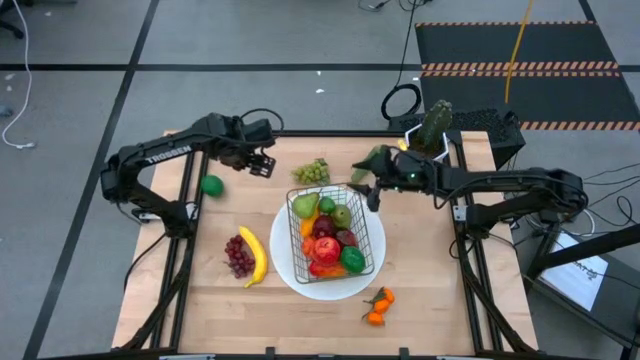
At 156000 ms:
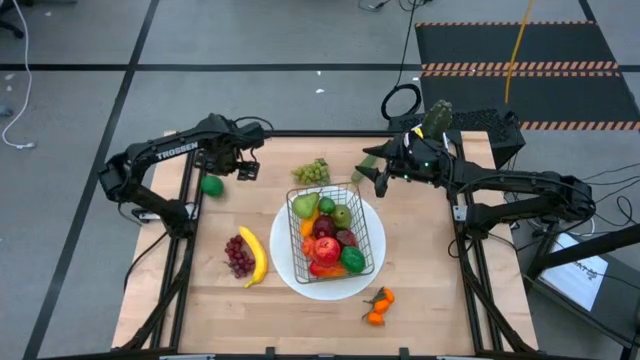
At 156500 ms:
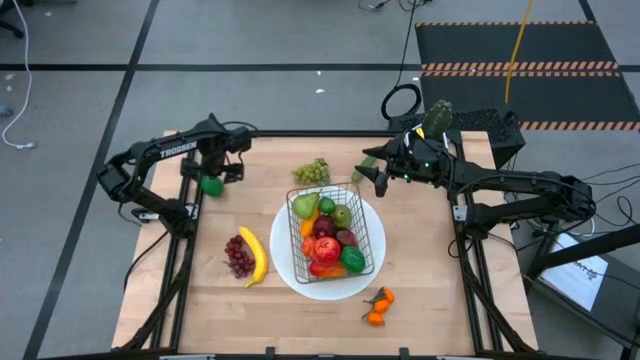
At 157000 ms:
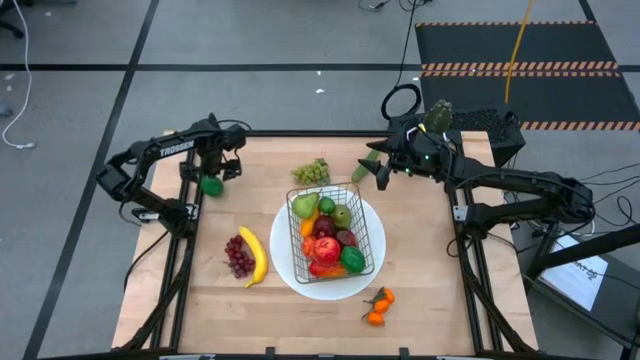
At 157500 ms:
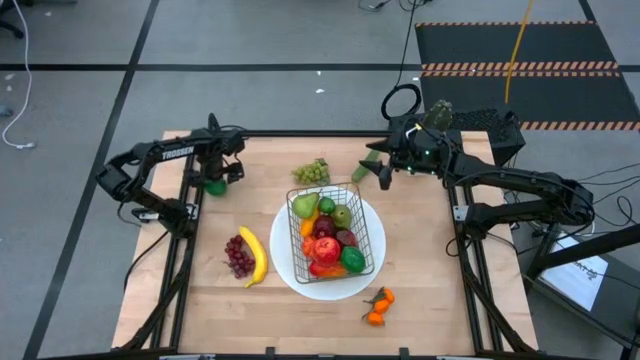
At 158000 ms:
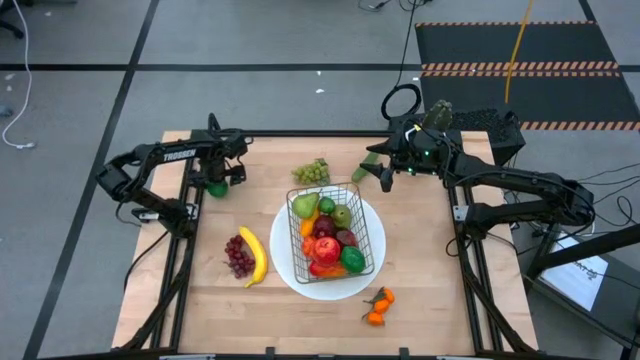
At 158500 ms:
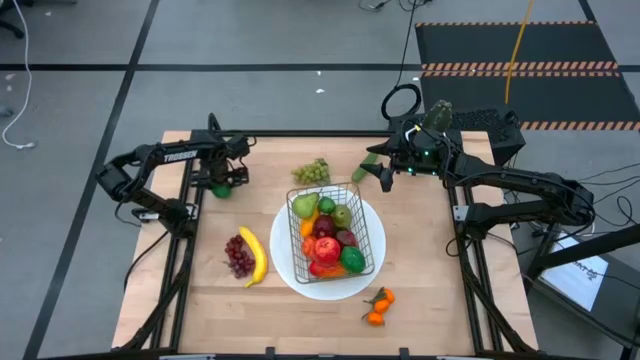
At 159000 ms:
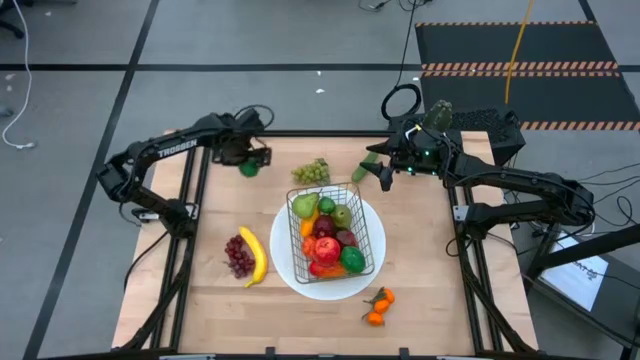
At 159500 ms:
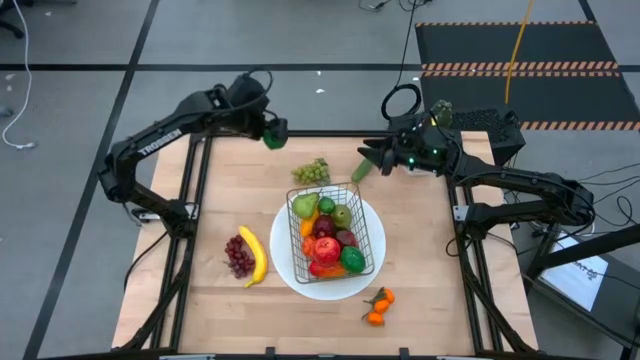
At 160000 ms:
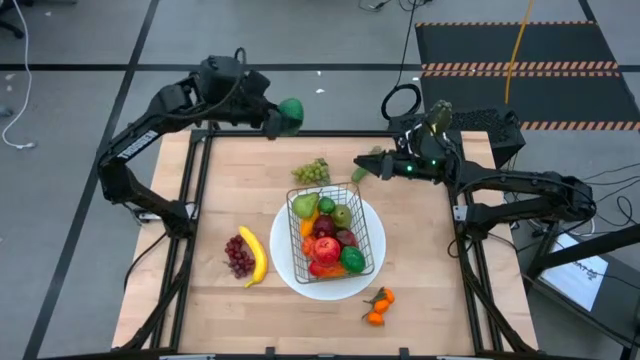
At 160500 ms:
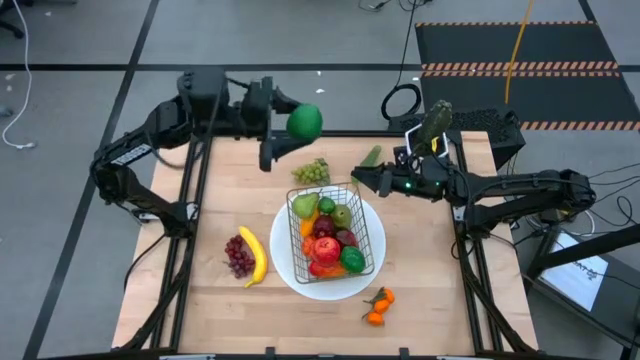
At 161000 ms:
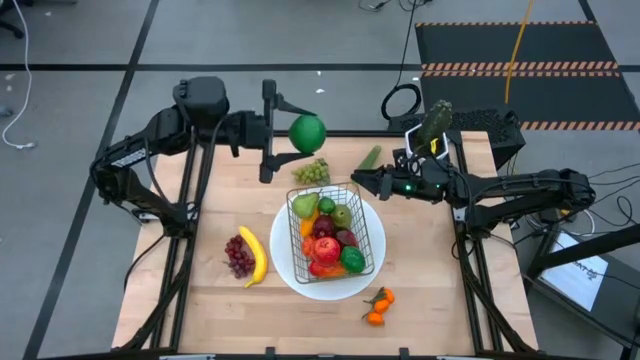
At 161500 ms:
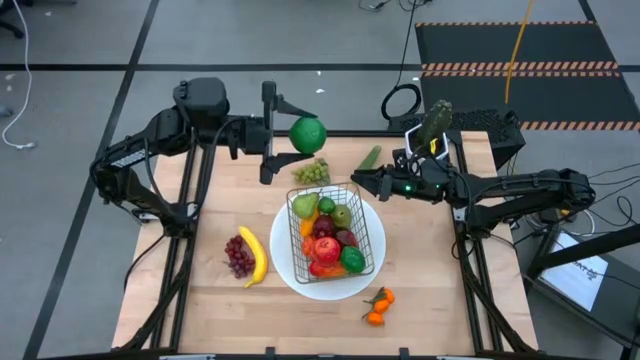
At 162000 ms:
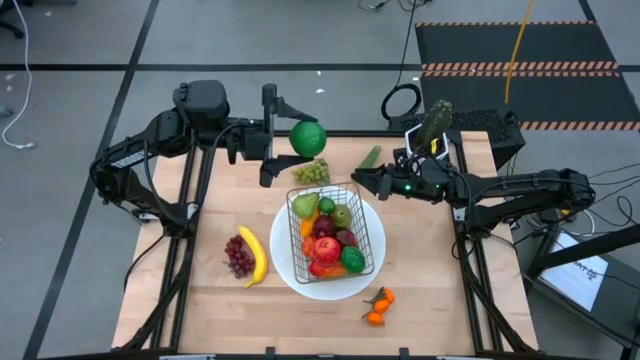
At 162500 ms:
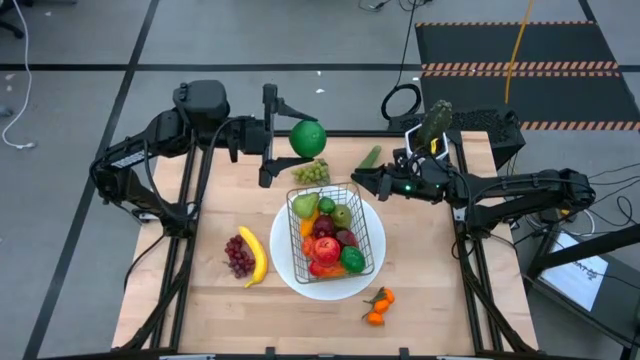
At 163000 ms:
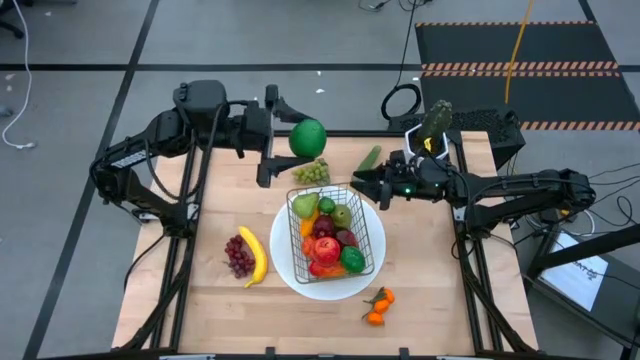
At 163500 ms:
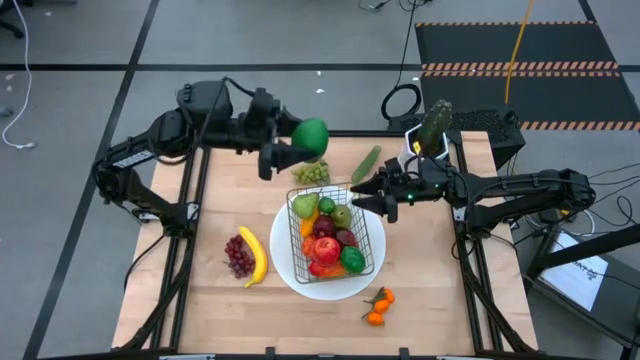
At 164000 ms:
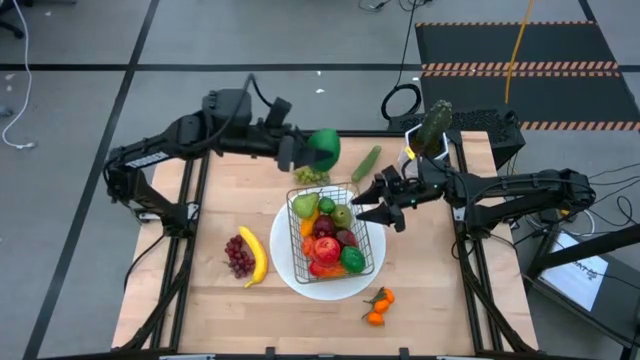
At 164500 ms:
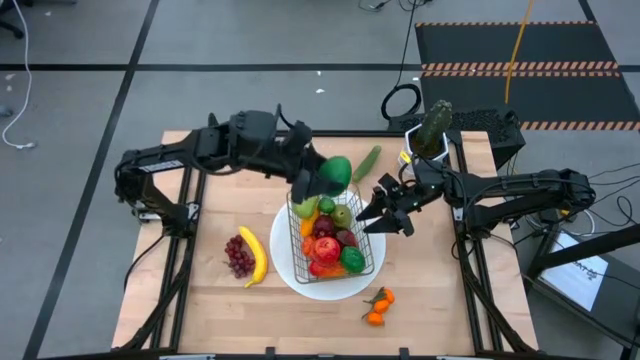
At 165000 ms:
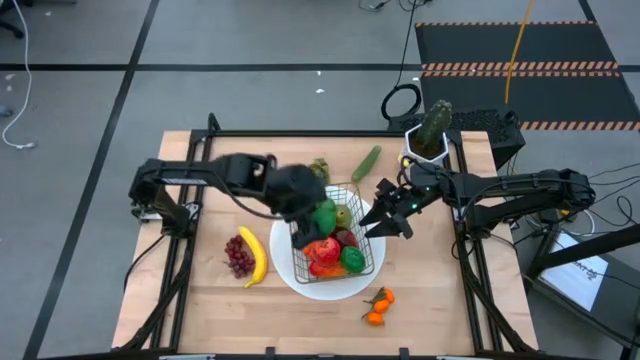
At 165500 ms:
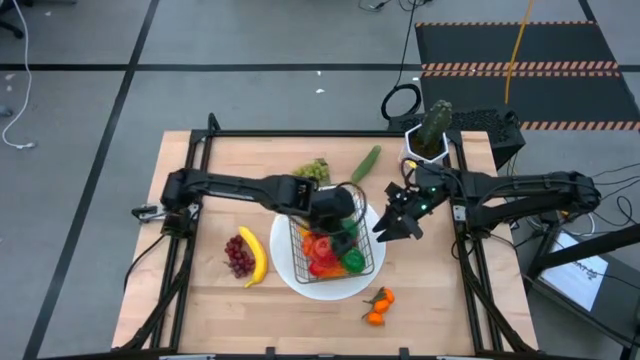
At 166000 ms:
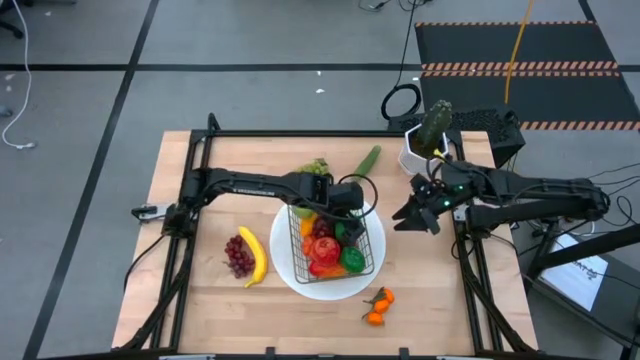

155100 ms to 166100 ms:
Task: Build produce basket
Put the green lime into the black wire basket

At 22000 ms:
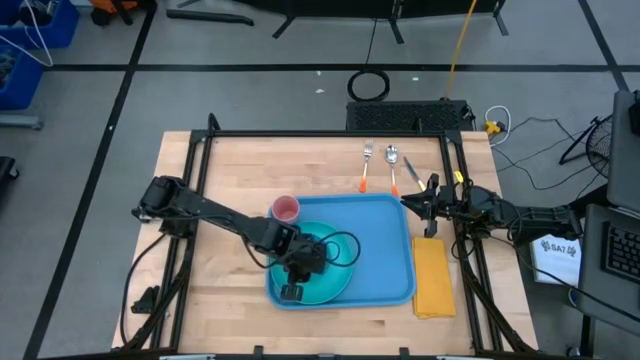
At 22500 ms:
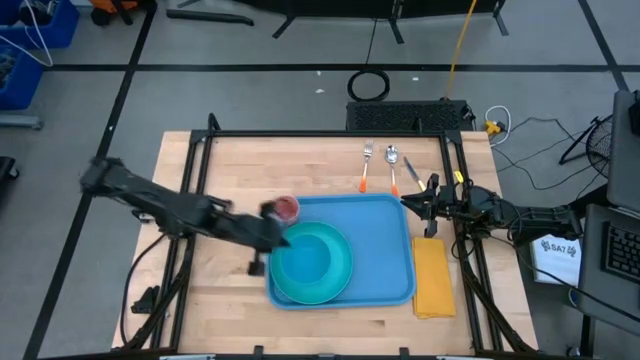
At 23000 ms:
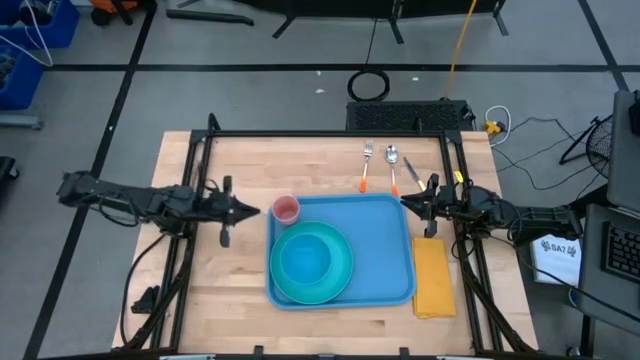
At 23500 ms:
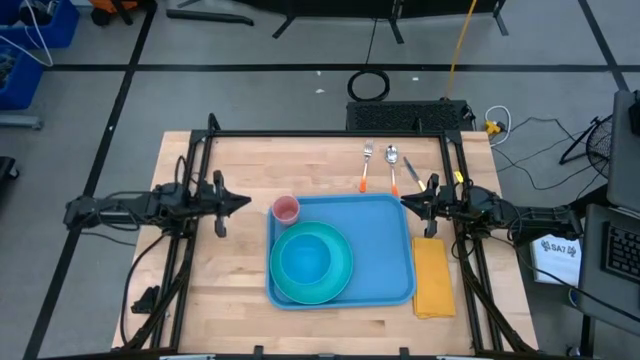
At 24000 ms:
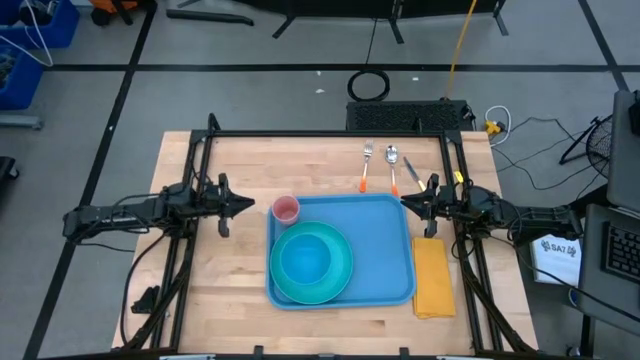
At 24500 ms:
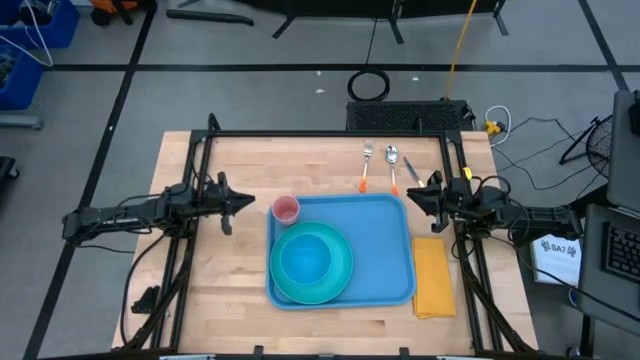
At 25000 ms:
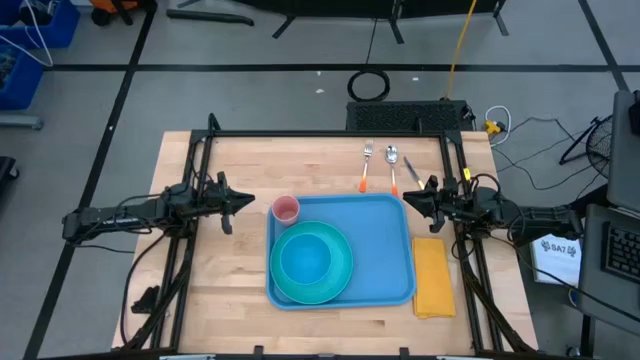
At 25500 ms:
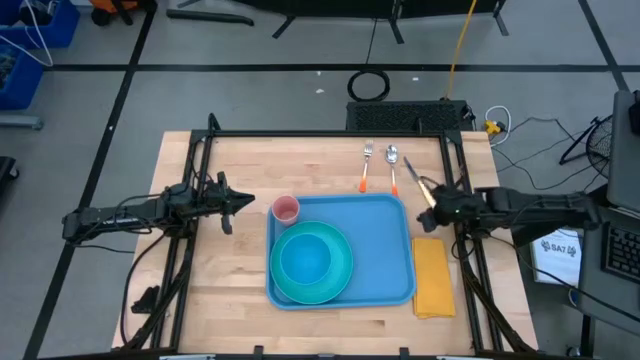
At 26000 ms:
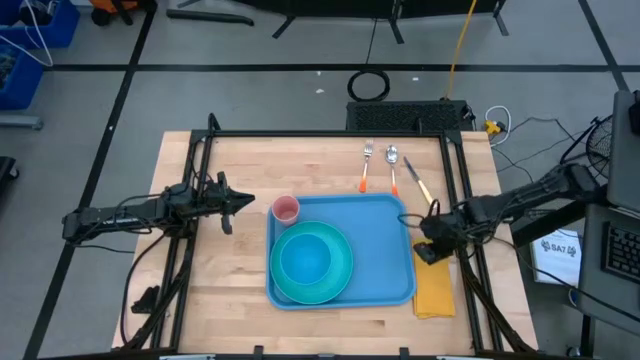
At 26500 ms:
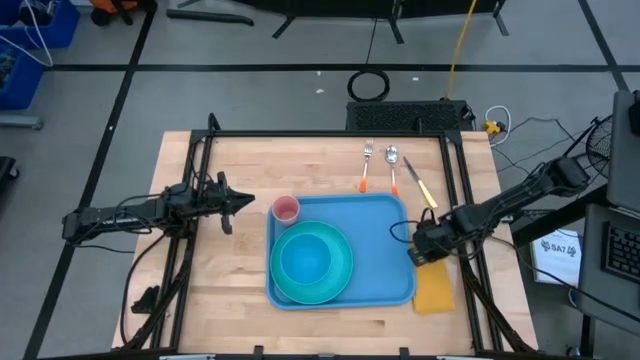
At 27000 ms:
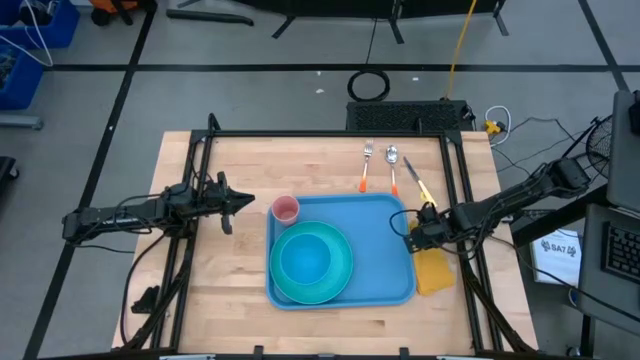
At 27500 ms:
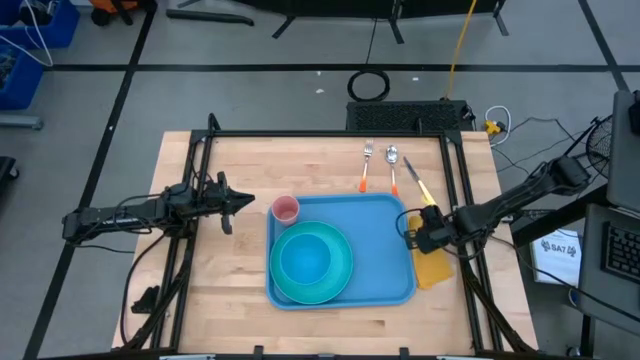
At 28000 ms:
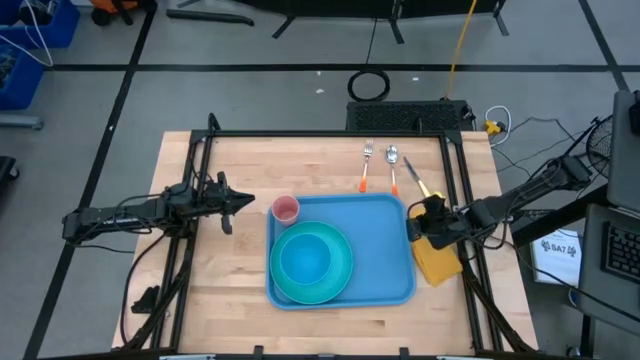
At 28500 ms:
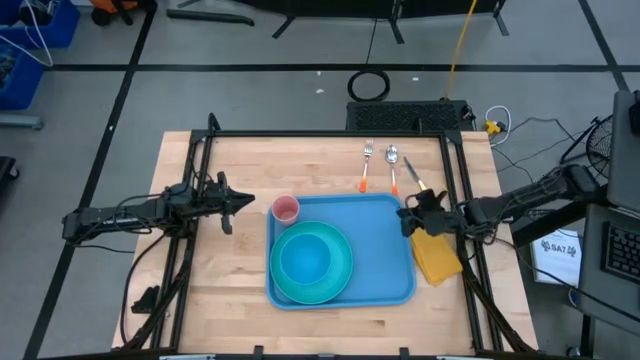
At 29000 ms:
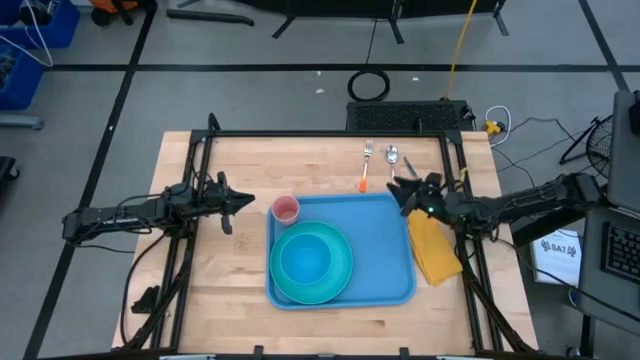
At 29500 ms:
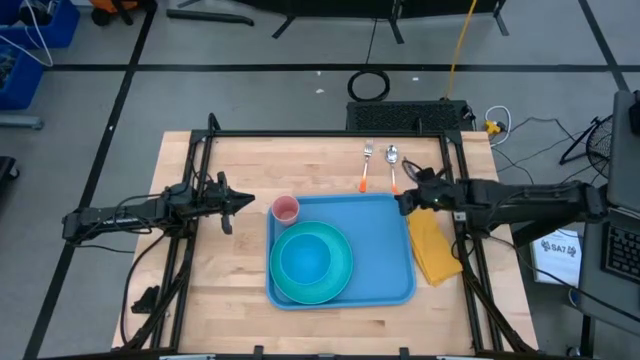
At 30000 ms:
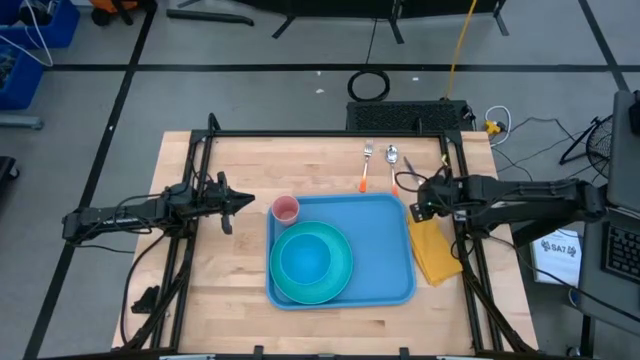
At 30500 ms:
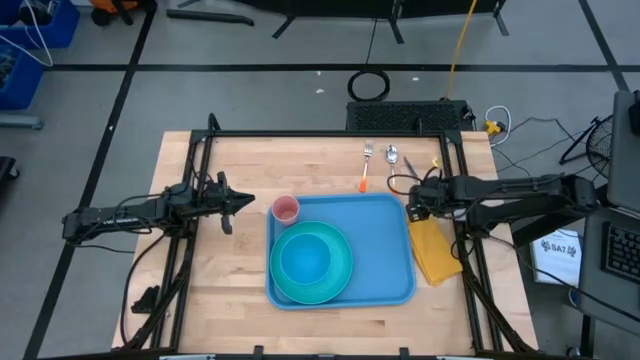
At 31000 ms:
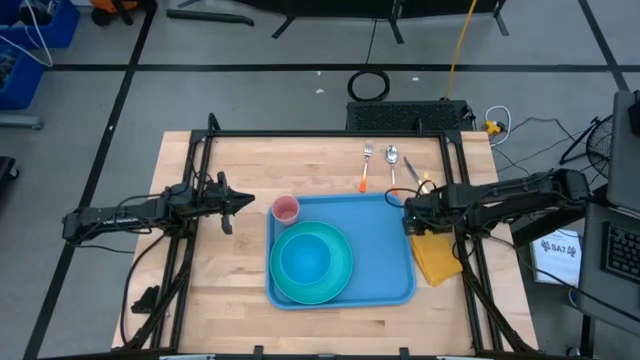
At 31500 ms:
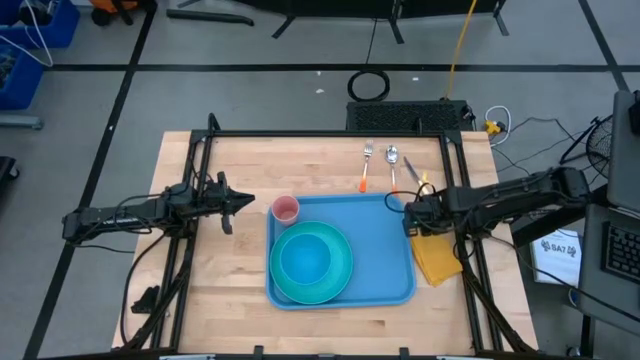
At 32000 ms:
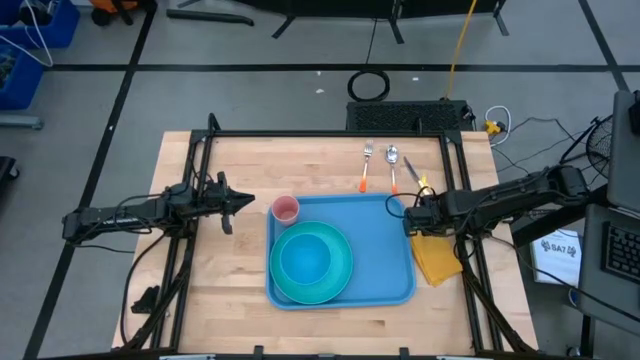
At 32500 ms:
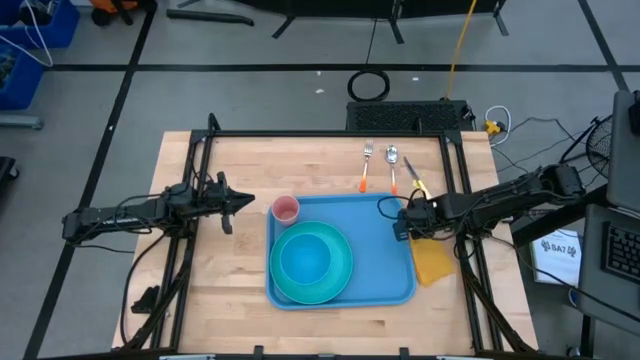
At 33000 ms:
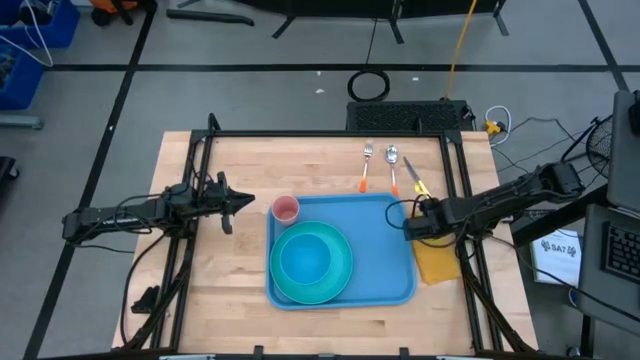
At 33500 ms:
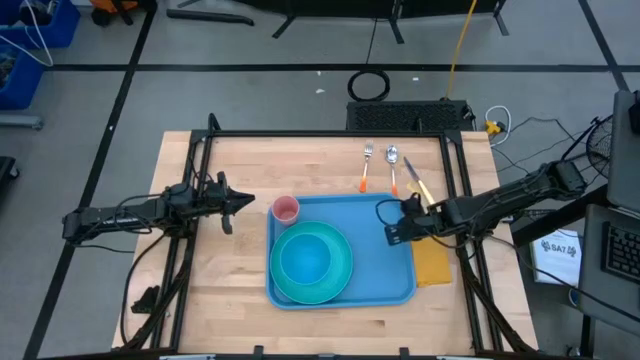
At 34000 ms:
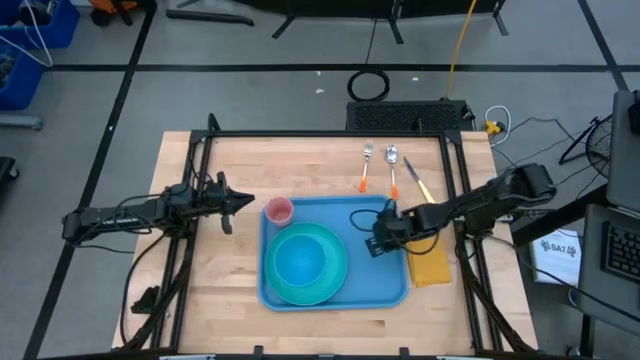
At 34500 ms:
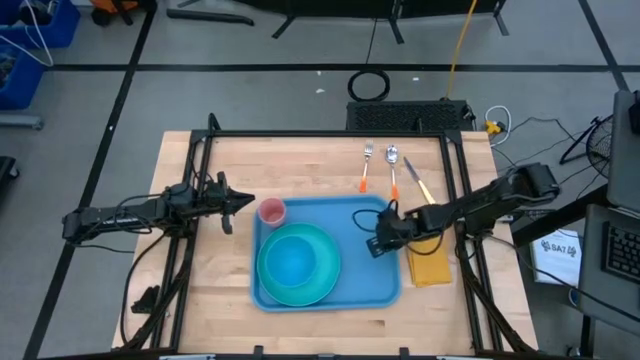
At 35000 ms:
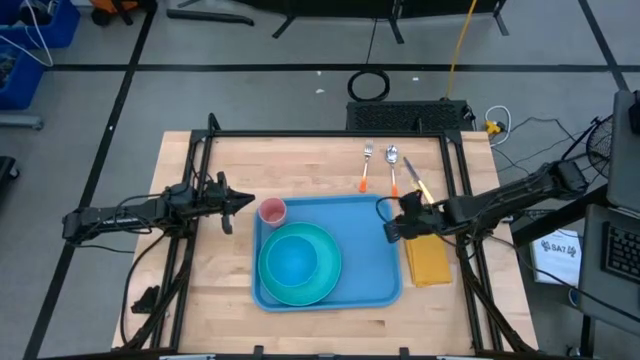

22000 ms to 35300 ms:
Task: Set up tray
Put the yellow napkin on the blue serving tray to the right of the light blue plate
